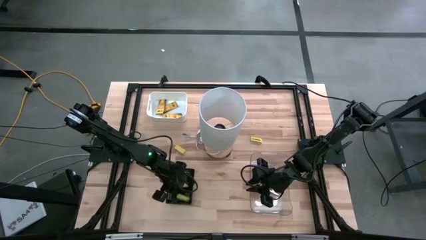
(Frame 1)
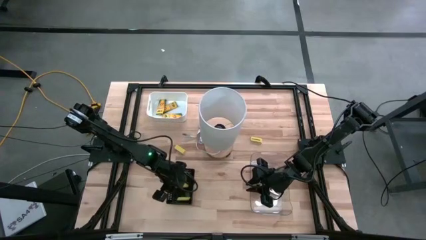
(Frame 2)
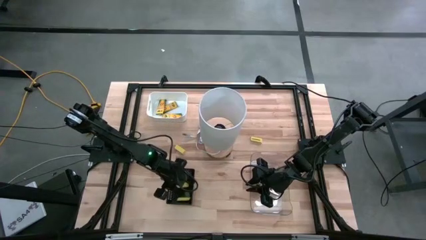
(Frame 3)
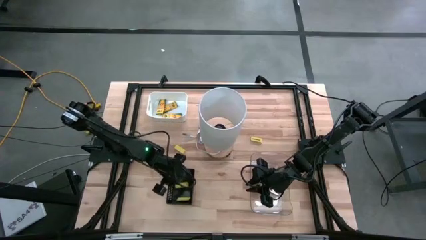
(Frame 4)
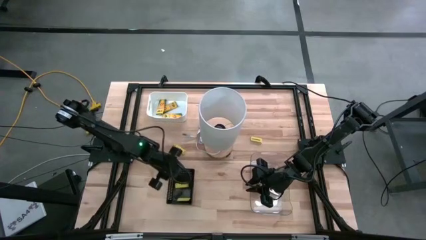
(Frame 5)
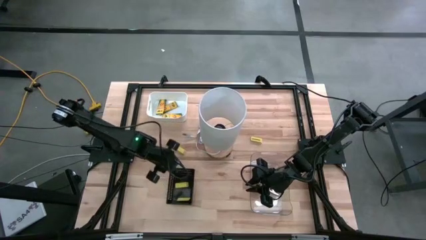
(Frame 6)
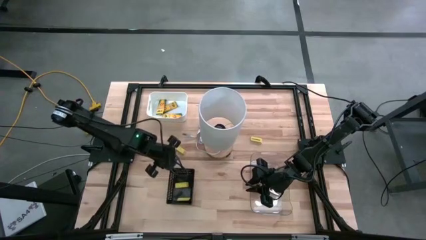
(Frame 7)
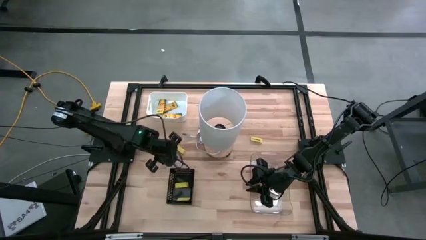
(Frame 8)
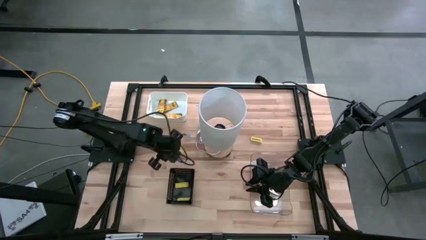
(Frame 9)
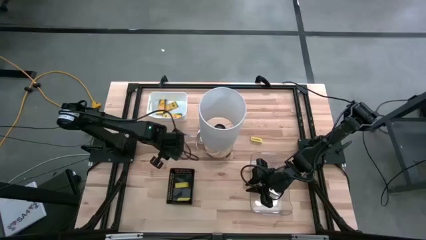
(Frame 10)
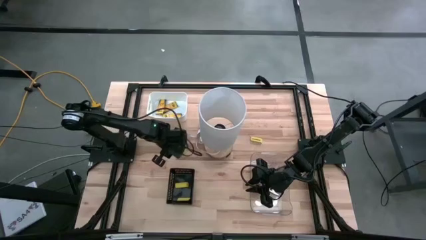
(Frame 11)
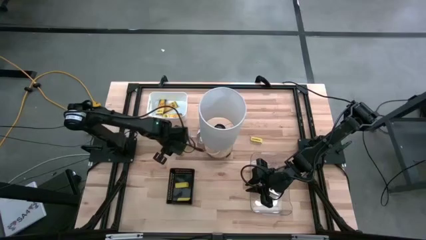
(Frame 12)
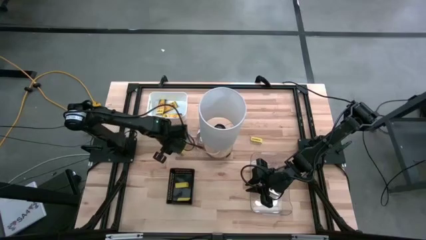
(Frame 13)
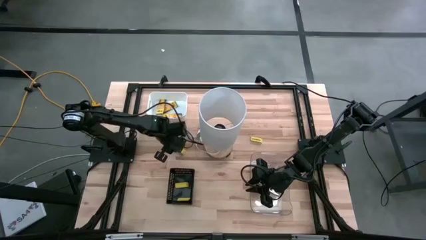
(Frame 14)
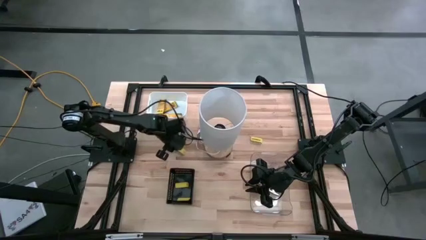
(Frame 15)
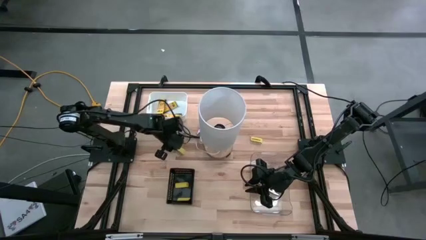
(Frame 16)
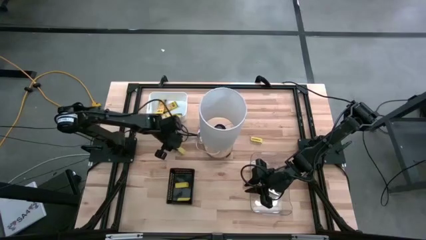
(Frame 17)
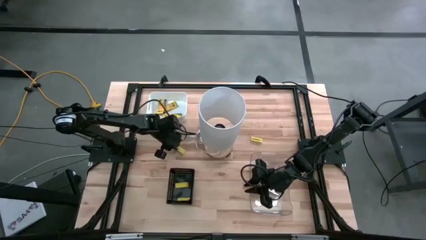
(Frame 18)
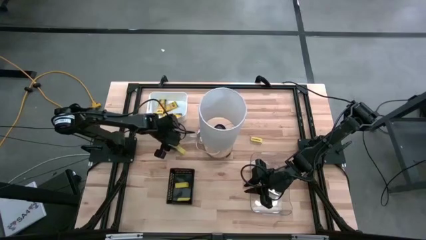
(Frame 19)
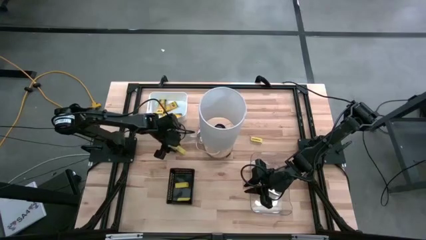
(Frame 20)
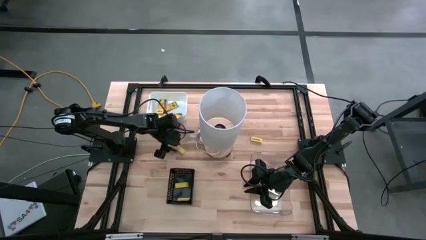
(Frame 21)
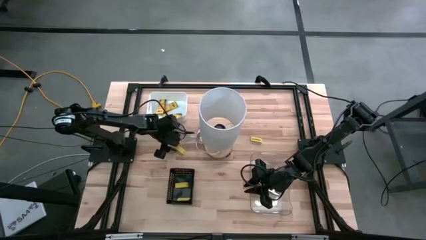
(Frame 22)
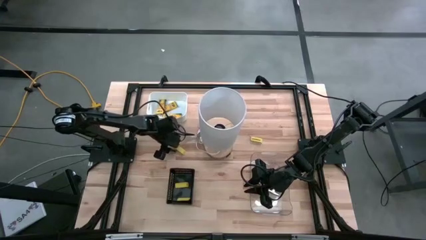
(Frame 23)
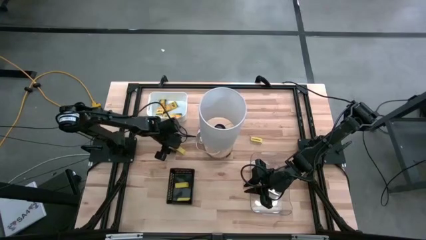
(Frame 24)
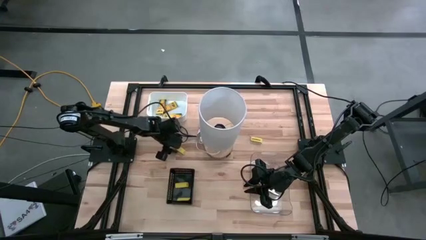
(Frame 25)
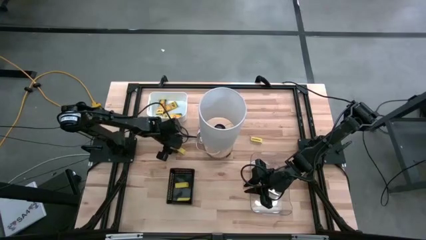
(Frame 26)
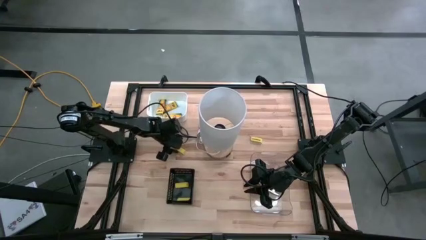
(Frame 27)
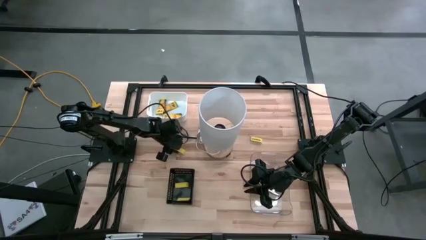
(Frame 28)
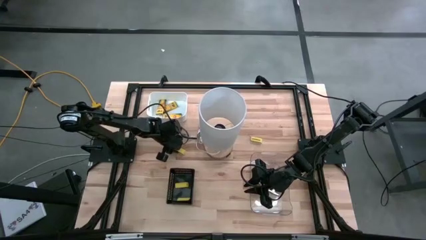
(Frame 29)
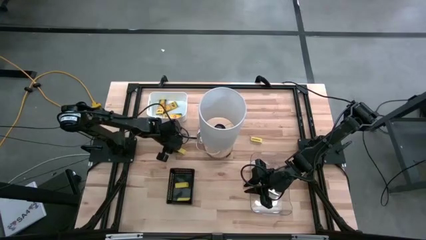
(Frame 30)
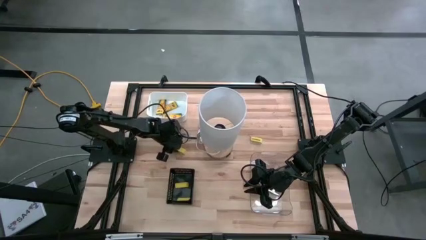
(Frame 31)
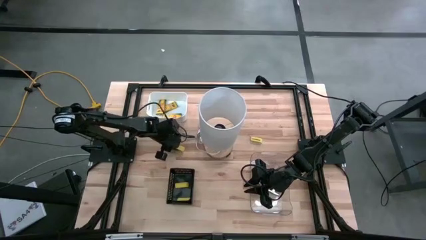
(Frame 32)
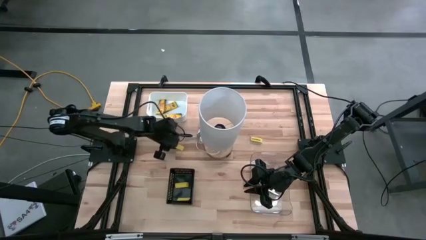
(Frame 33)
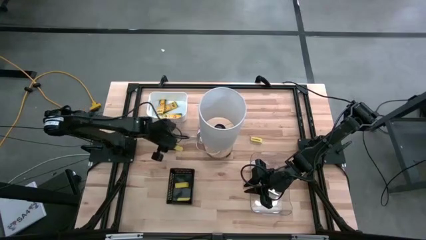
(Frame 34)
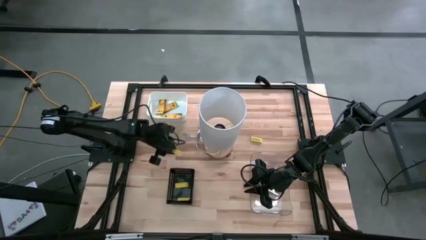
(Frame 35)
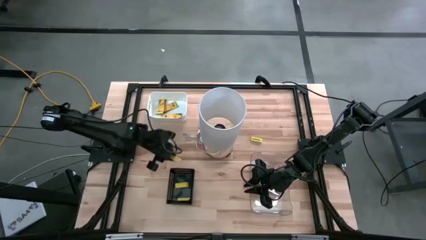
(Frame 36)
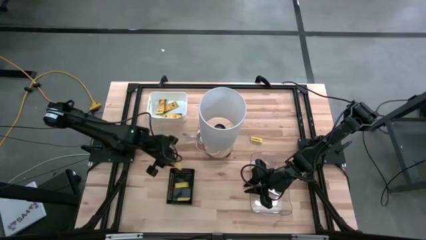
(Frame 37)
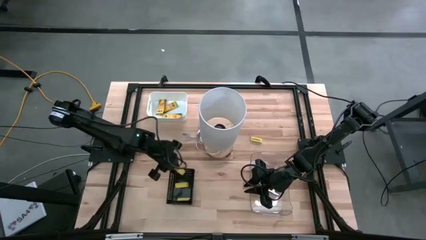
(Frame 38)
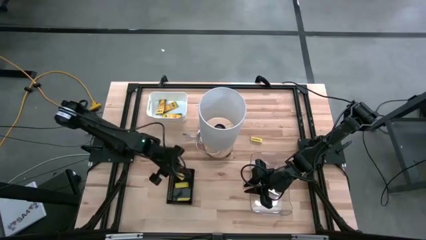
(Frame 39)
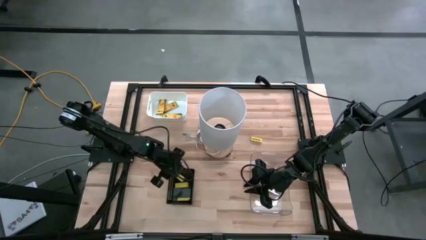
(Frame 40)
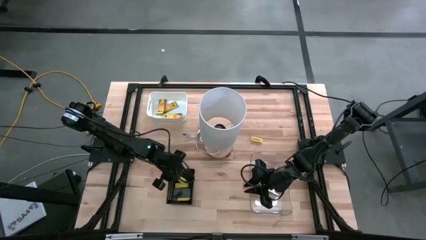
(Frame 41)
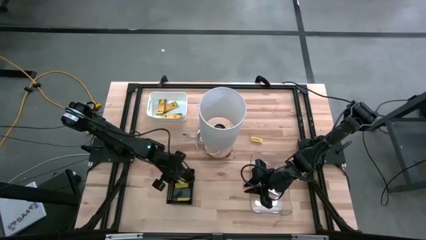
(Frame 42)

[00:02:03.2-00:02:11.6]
Task: Pick & Place School Supplies
Put the yellow eraser into the black bin

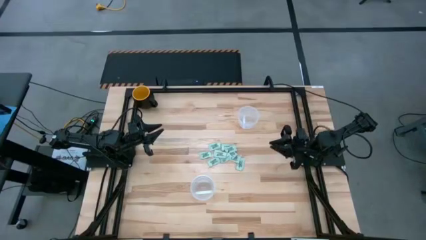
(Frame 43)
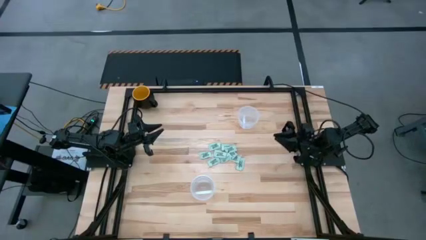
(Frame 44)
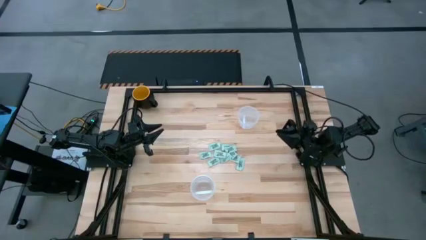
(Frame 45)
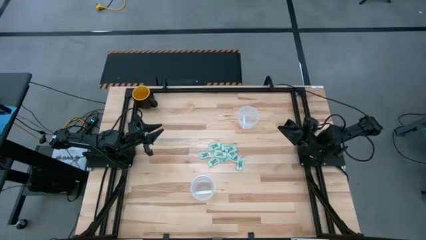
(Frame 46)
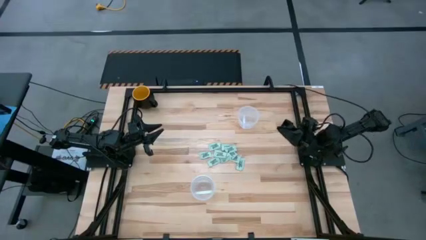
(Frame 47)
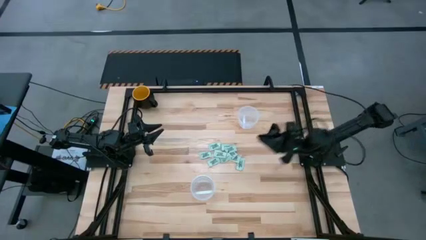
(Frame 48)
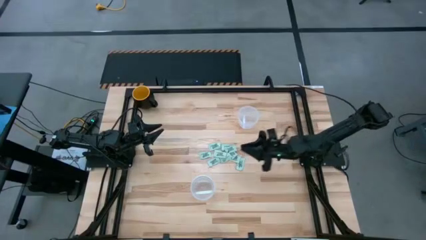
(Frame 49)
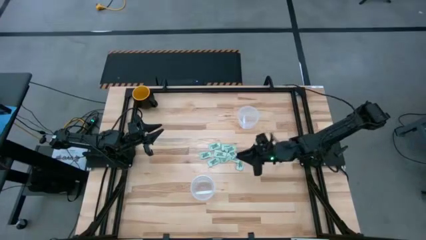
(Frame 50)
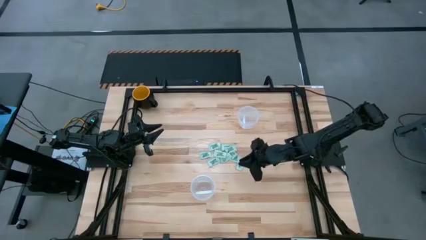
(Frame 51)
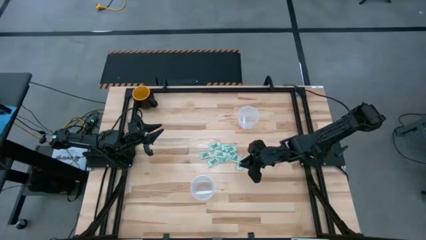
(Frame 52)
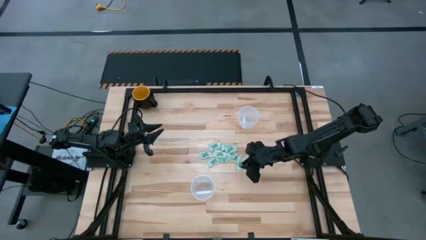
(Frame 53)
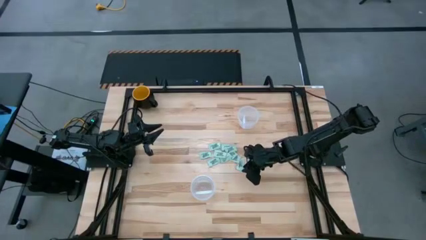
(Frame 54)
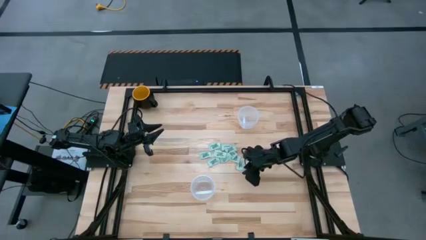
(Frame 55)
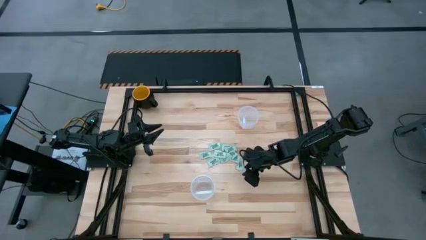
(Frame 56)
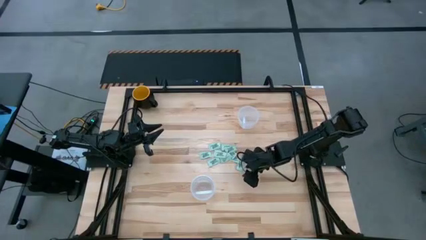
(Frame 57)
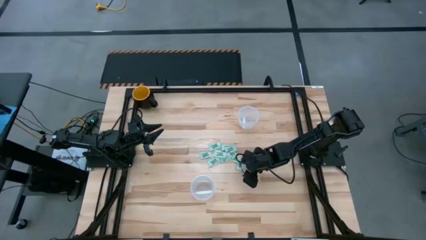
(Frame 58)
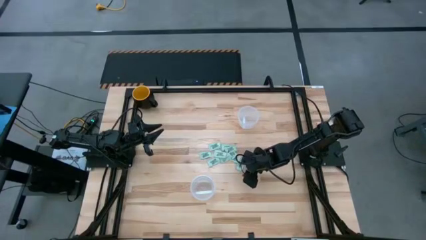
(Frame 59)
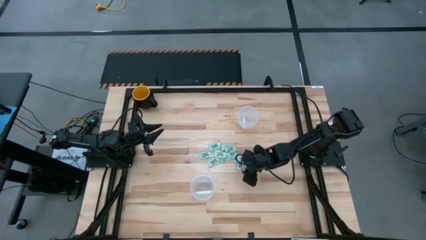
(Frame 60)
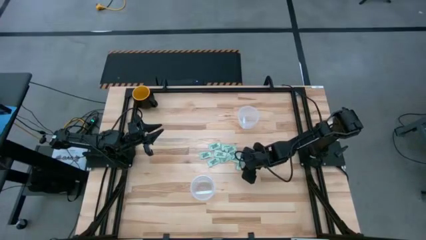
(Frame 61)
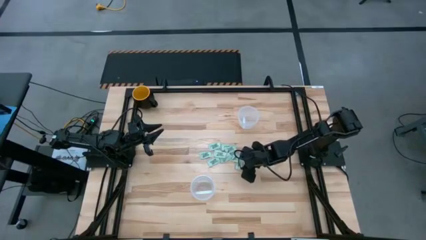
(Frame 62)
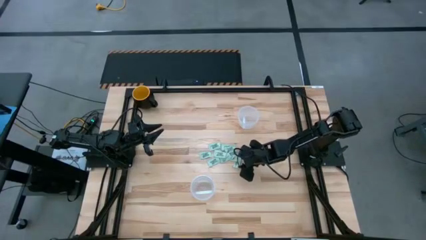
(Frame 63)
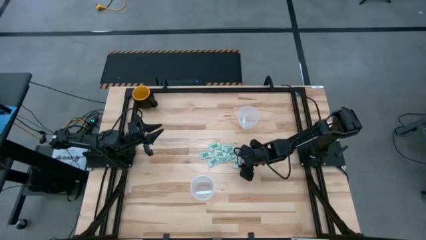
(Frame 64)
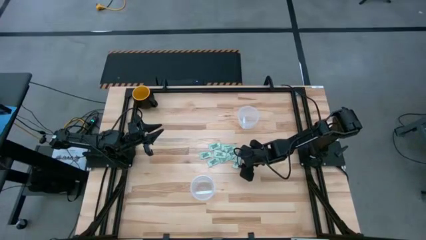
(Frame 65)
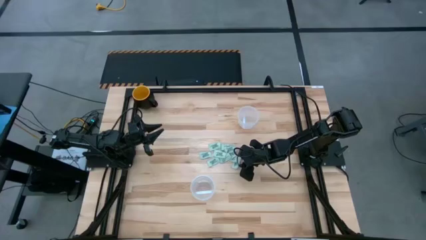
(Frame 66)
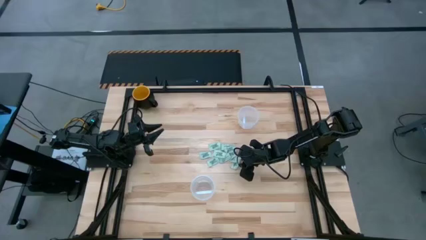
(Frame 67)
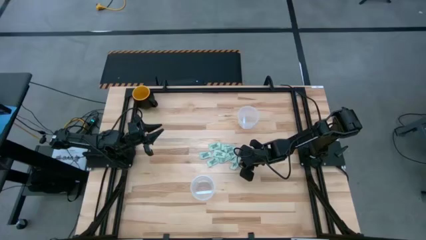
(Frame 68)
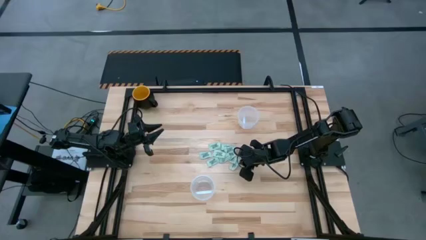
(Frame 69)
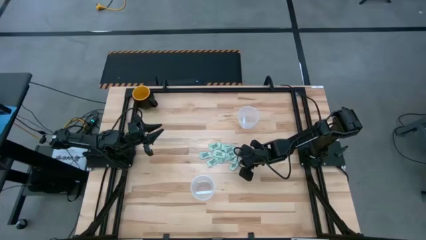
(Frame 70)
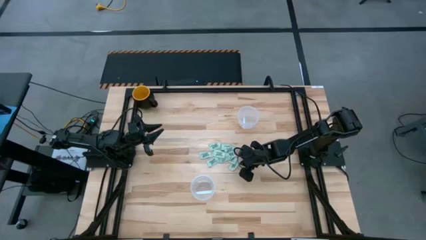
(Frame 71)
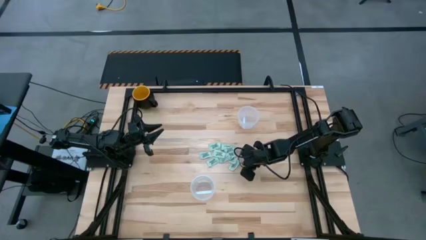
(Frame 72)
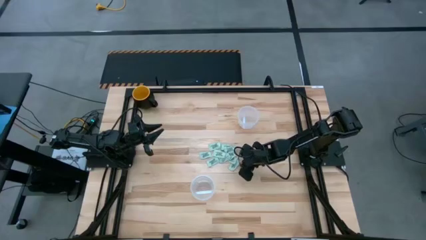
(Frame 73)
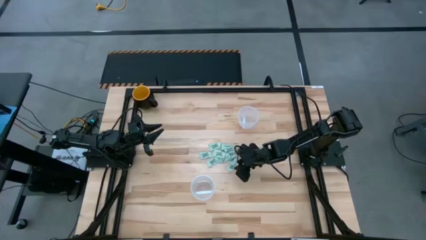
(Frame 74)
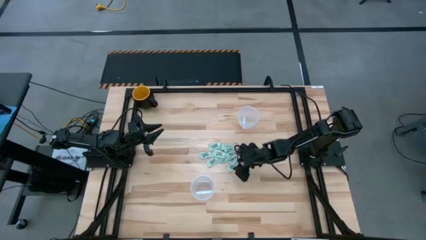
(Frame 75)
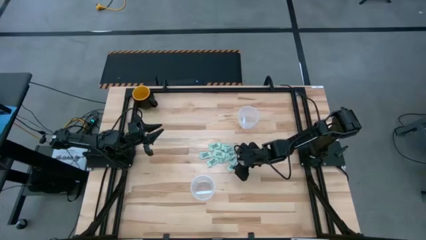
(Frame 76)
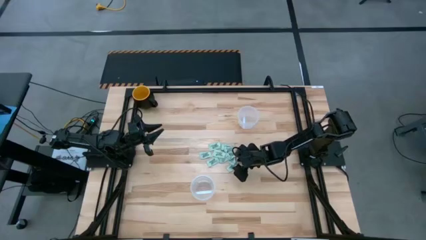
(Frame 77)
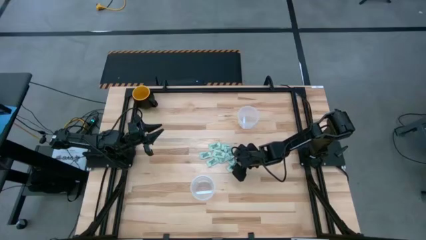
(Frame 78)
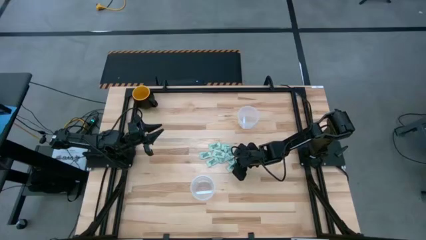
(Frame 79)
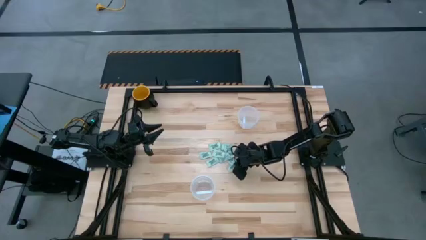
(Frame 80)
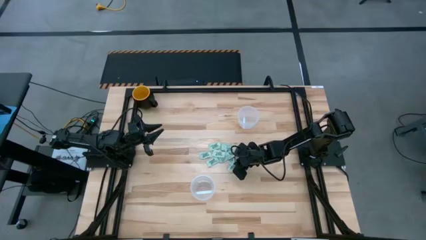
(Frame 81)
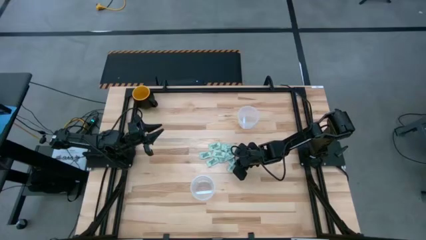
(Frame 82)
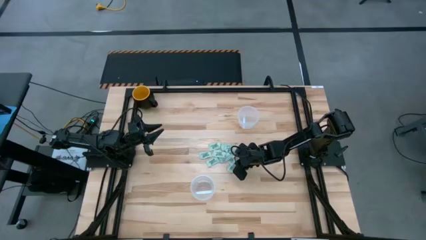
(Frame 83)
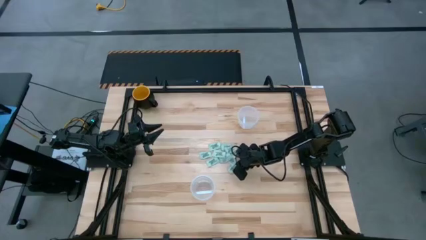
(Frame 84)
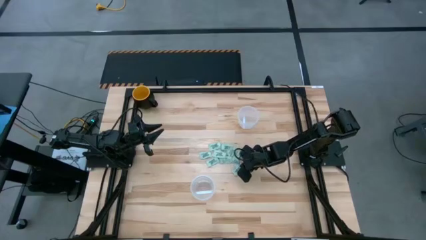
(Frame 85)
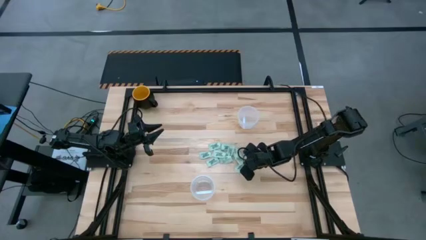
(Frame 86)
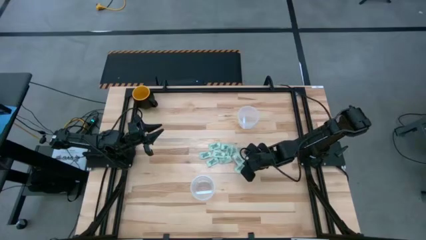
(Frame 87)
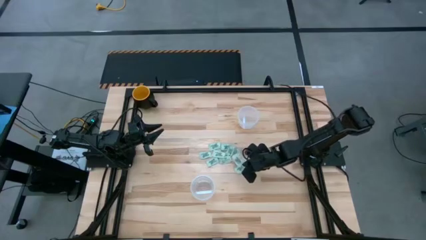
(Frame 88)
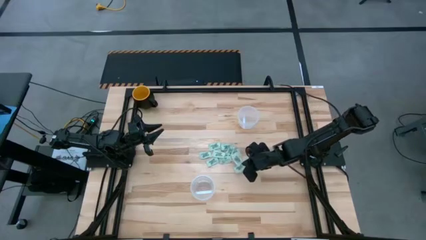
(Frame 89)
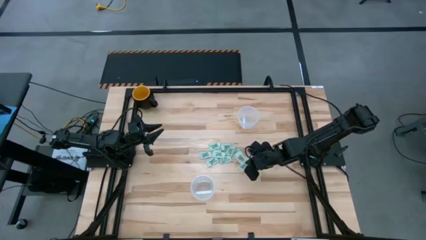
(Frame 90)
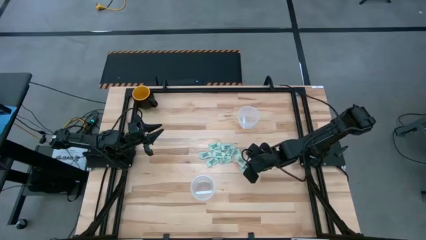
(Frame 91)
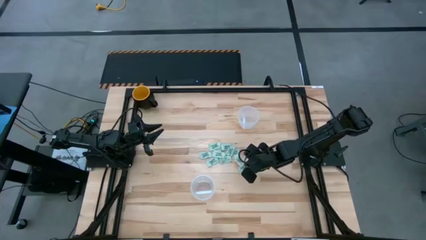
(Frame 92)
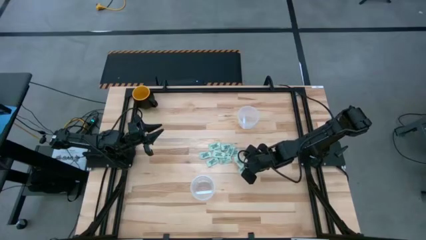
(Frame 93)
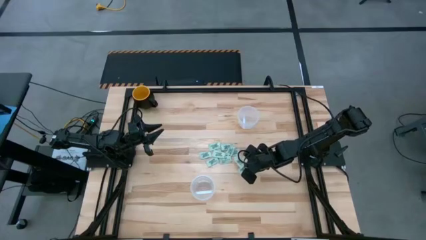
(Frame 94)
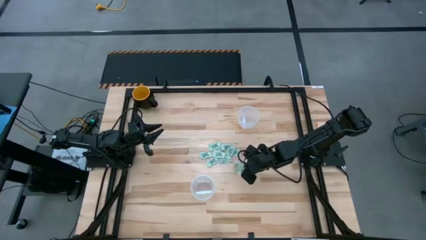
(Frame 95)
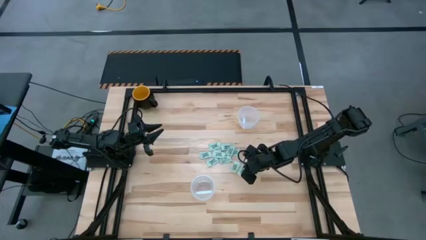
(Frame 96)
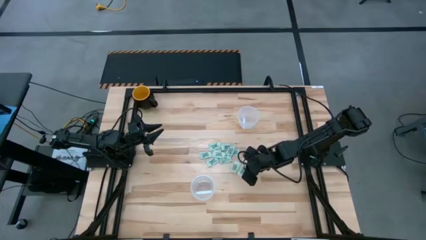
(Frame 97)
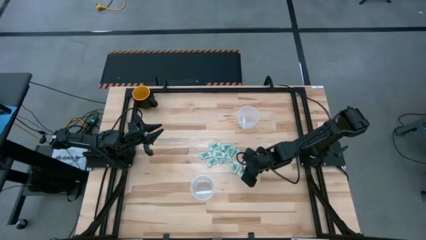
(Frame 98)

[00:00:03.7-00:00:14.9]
Task: Pick and place Stevia / Truvia into bins
Put the stevia packet into the top transparent container
